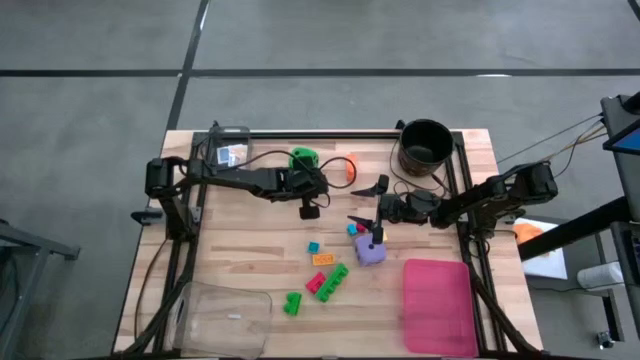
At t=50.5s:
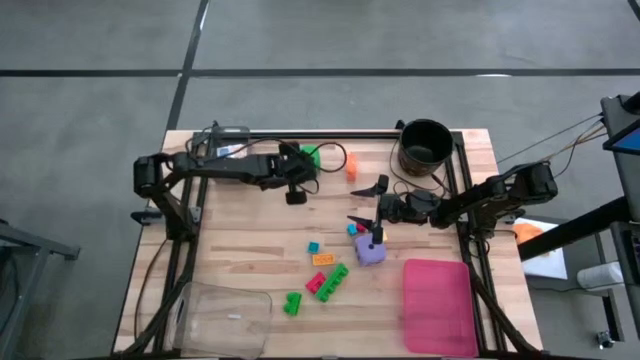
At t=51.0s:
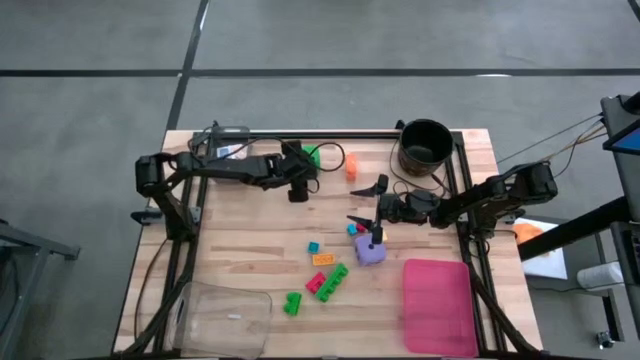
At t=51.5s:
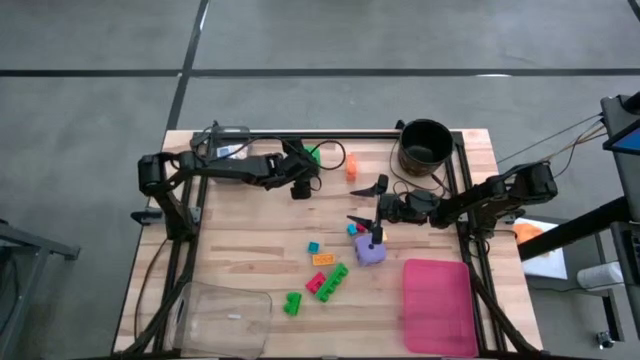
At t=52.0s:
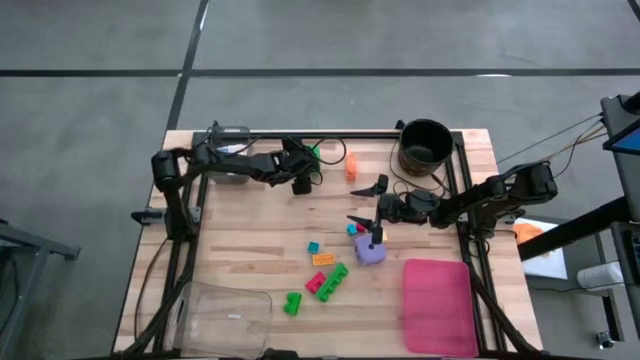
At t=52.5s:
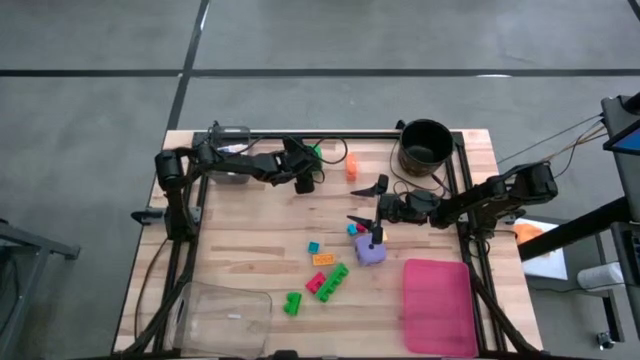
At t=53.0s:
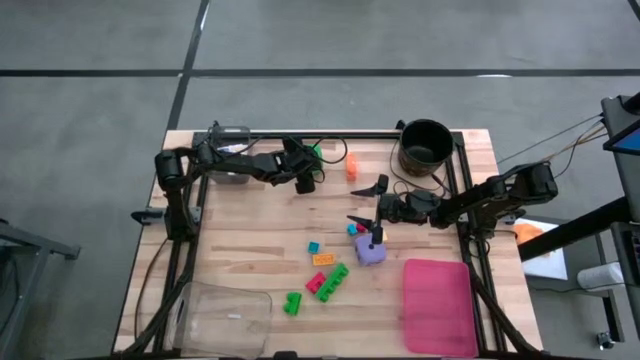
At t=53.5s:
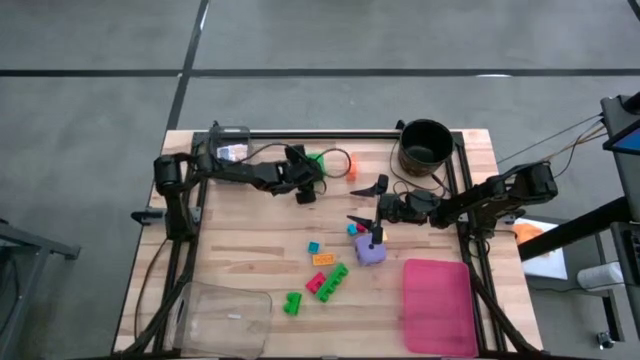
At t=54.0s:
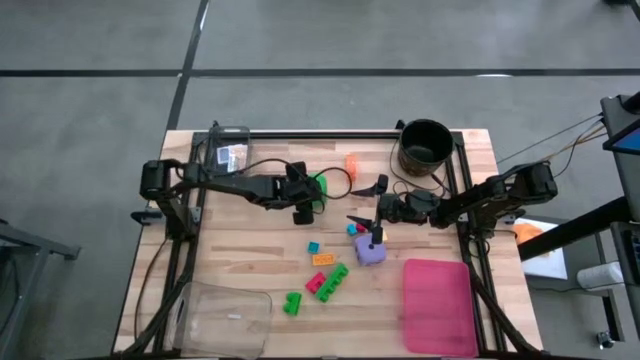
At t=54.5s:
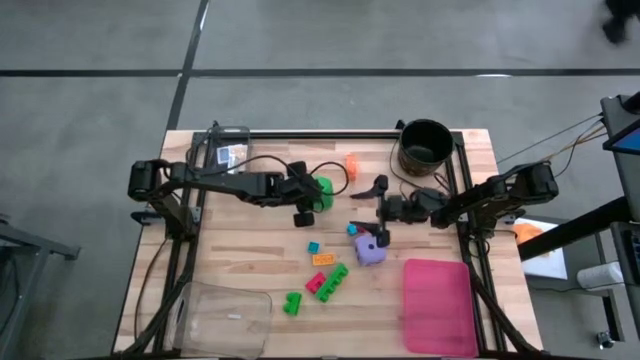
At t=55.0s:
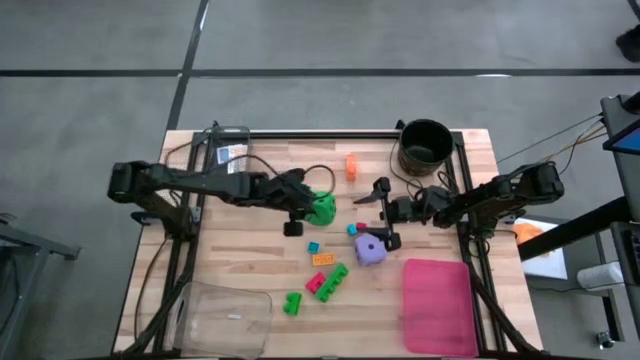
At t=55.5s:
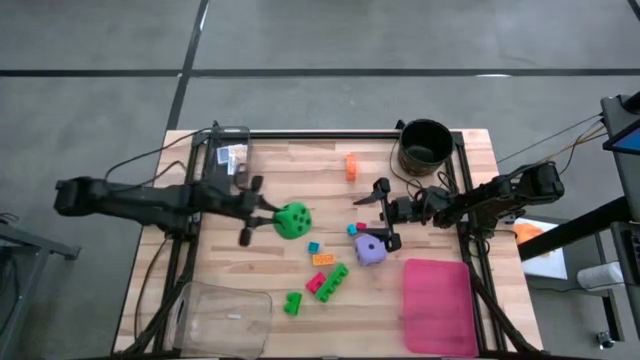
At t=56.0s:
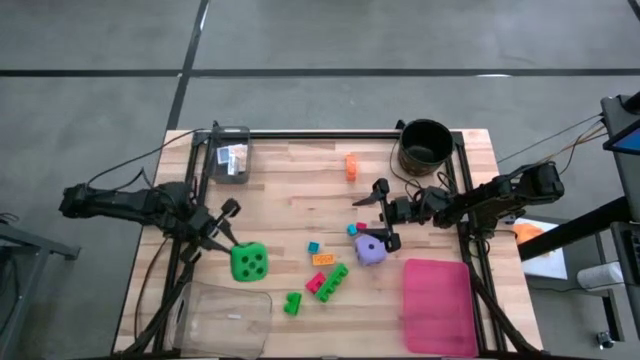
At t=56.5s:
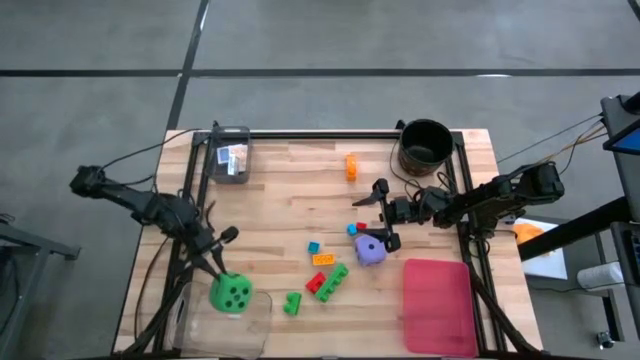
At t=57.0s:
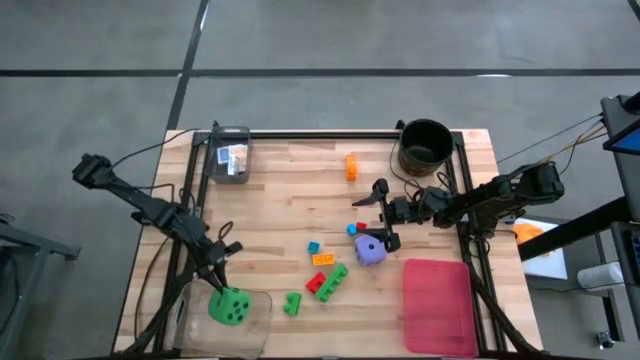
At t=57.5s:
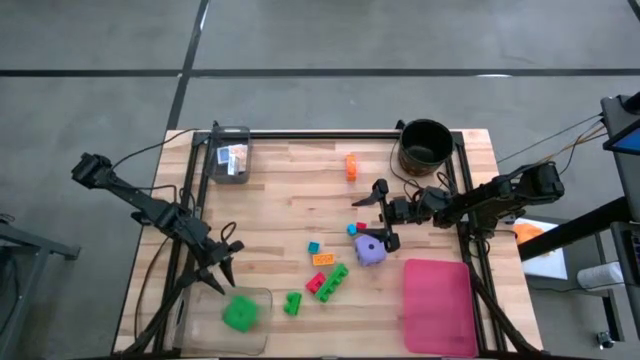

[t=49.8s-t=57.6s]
Task: Pick & Place Toys
Put the green die into the transparent bin

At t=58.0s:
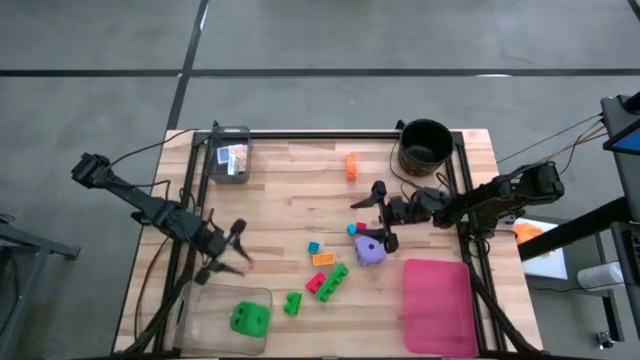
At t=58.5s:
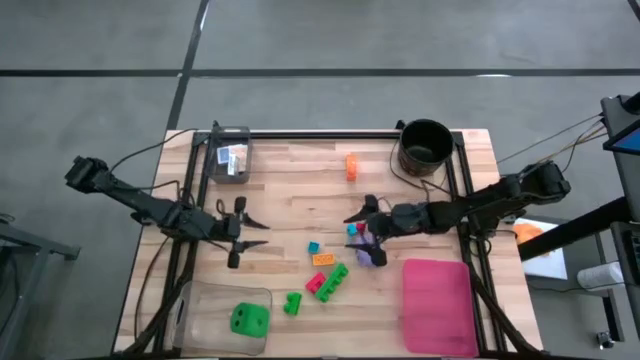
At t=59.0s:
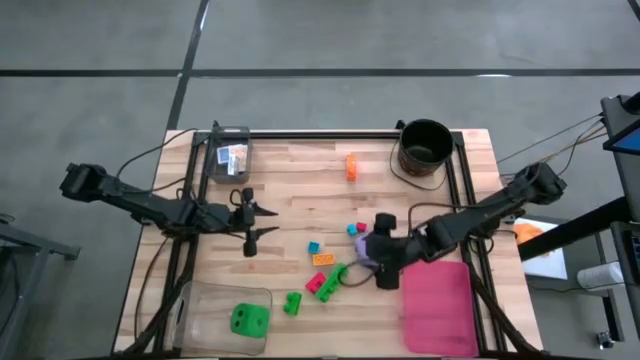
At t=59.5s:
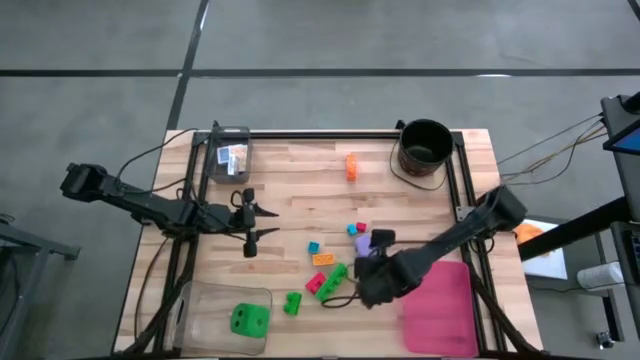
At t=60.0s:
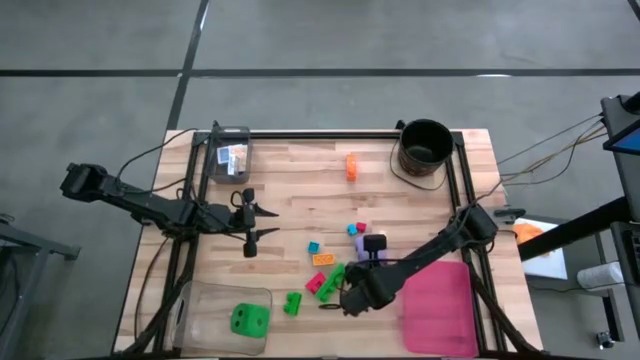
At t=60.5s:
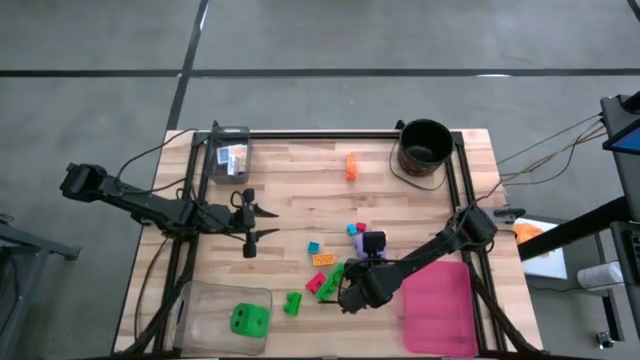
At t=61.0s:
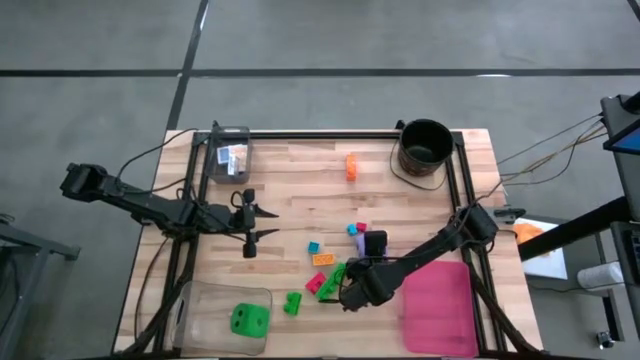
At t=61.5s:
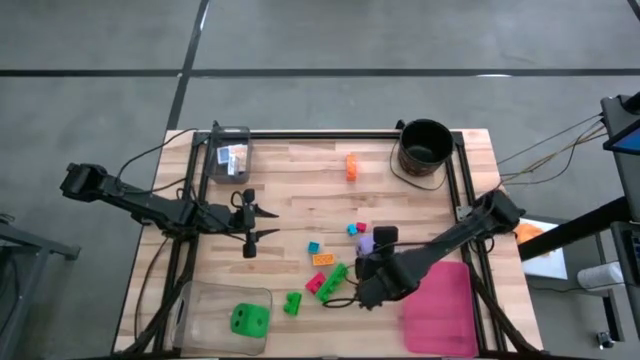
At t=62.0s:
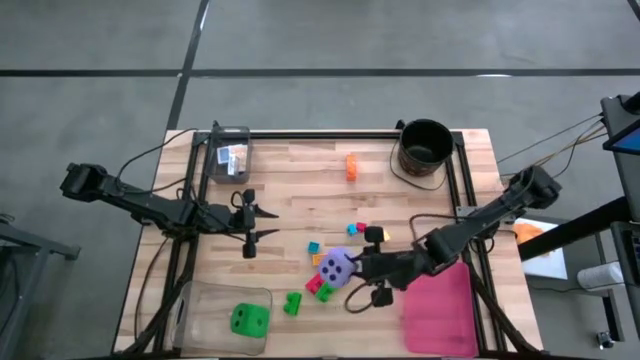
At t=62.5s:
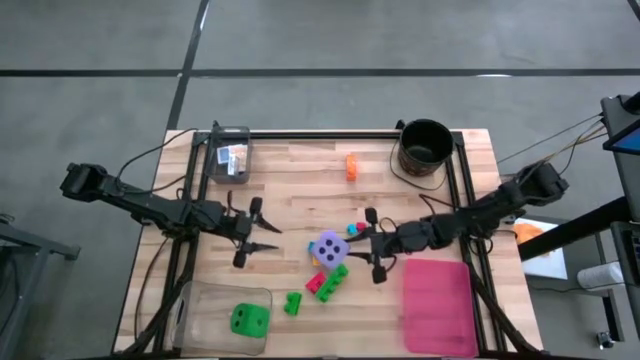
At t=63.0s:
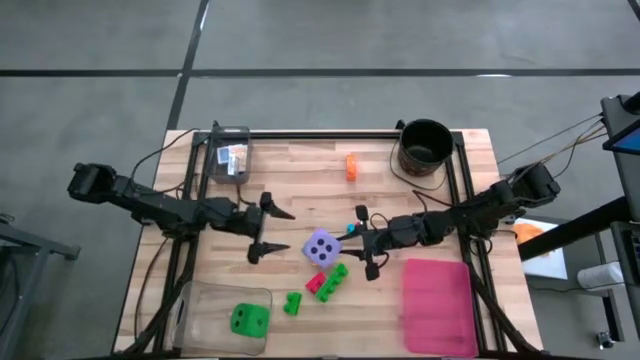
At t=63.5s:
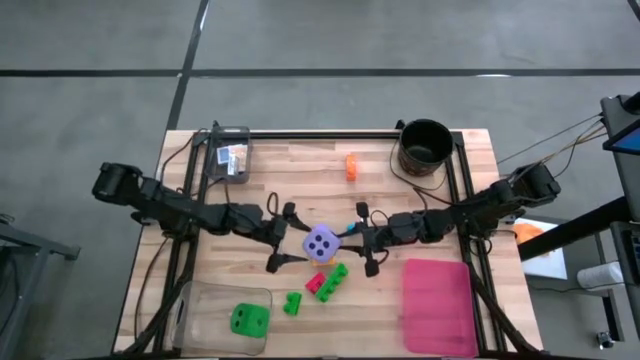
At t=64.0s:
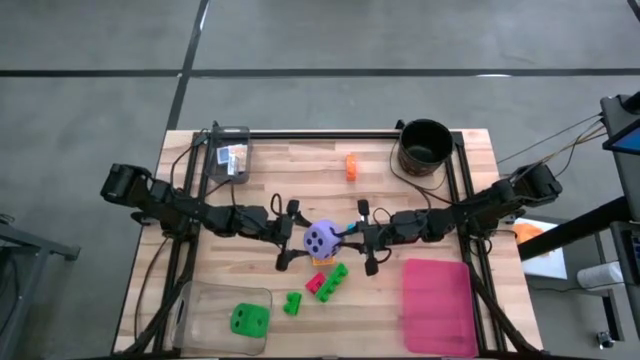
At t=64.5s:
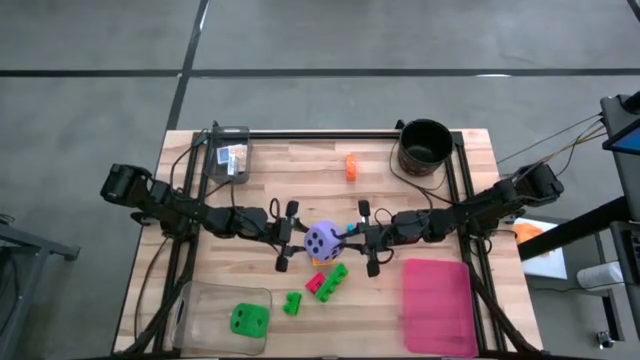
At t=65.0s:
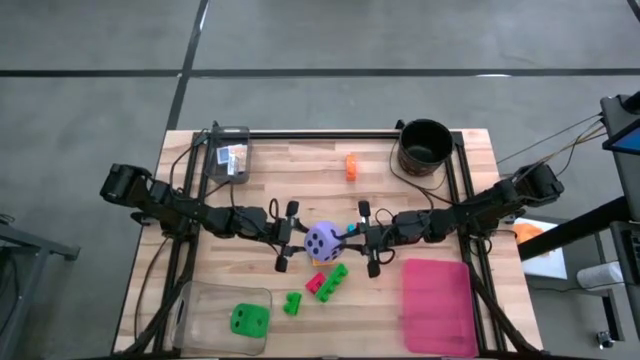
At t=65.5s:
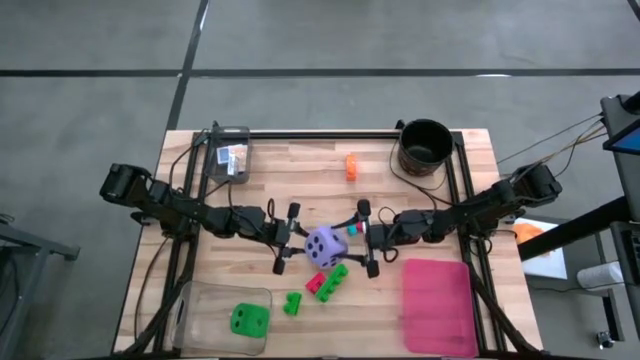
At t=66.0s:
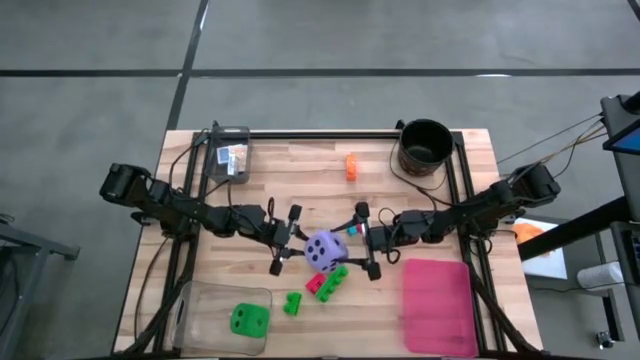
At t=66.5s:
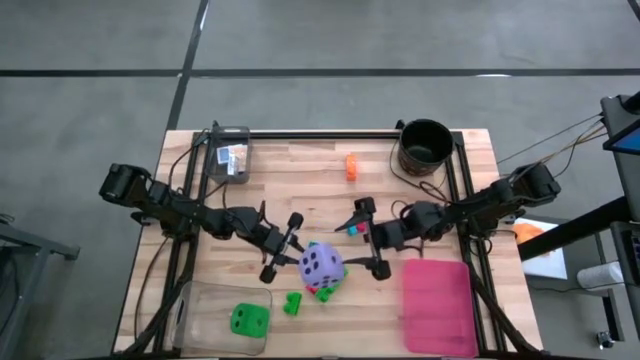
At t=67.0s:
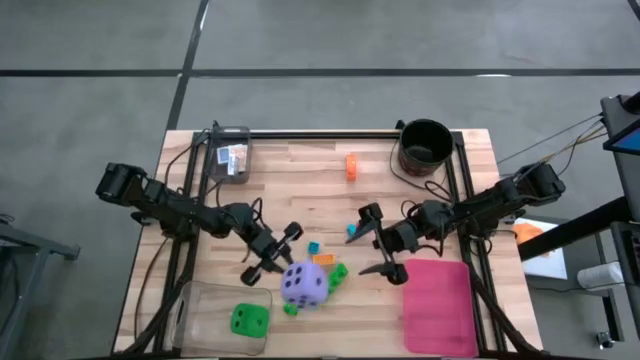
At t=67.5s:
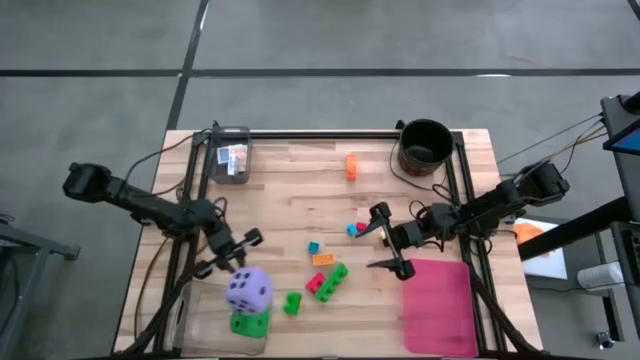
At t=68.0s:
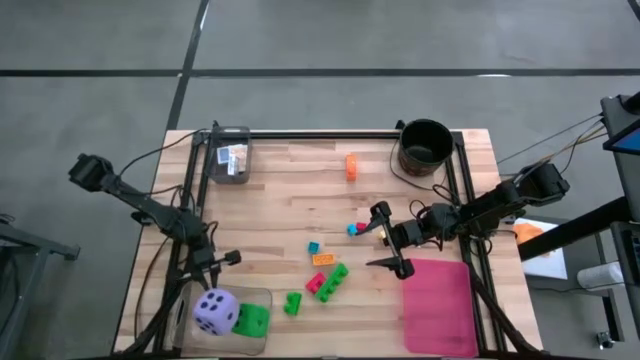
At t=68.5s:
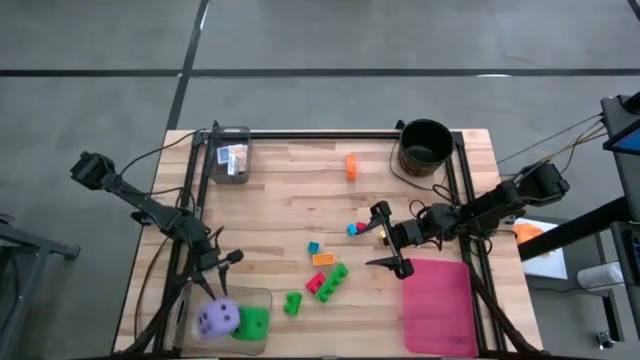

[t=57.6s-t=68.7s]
Put the purple die into the transparent bin

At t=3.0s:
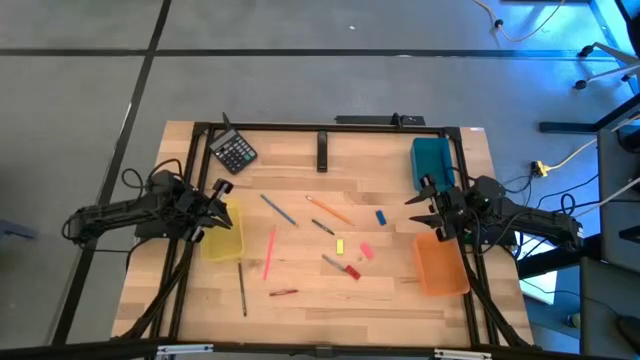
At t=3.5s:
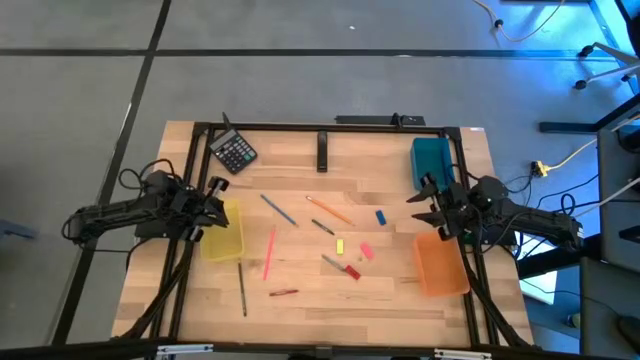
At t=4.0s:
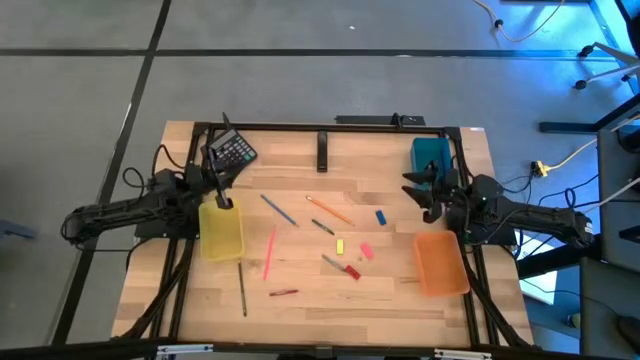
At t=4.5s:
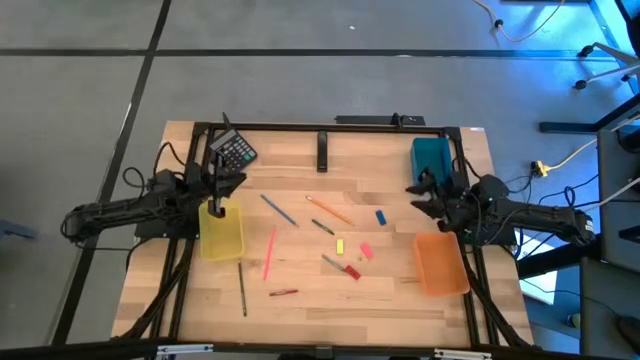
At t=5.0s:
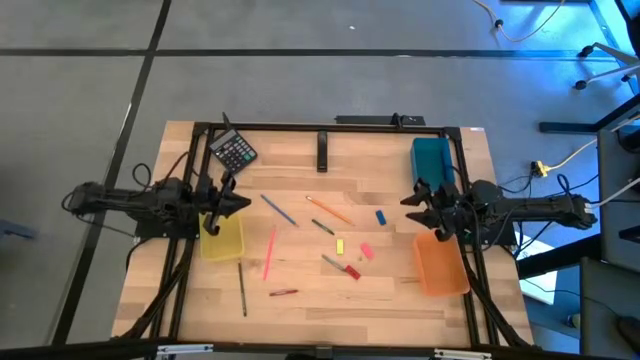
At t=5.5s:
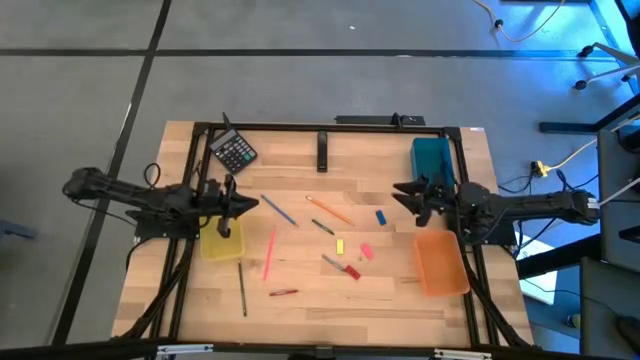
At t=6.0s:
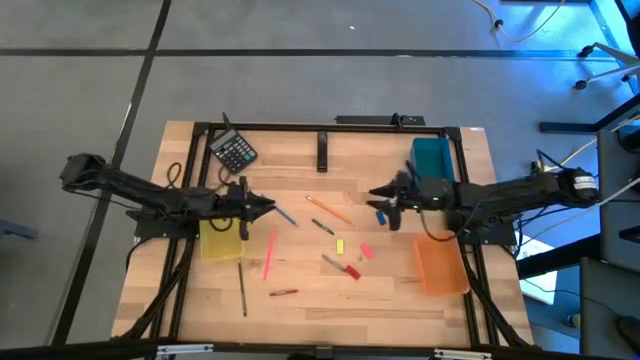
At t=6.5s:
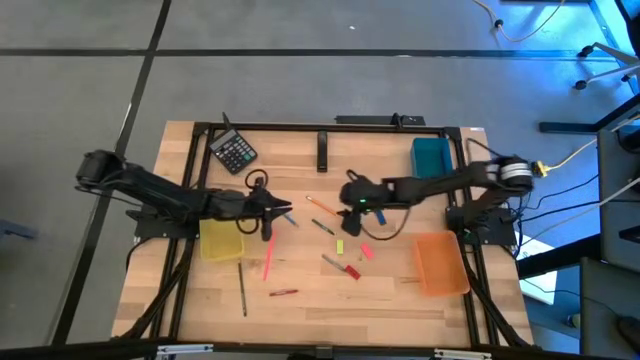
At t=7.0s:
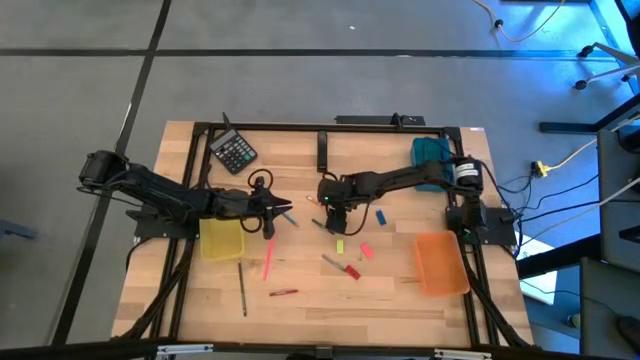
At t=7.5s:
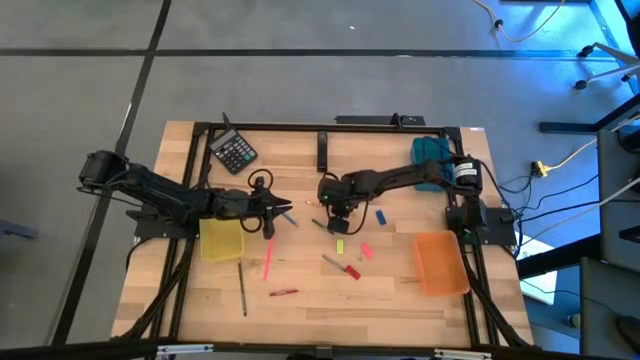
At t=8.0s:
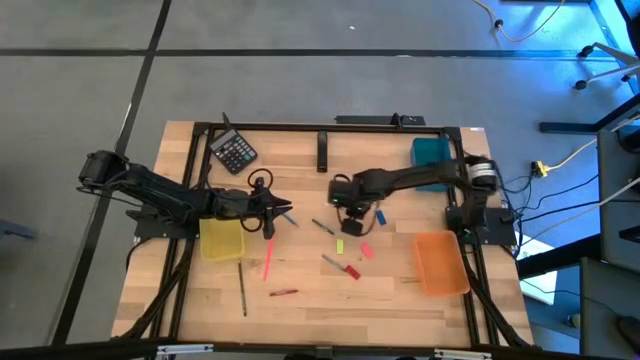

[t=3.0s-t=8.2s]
Task: Sort crayons/erasers/pens/pencils in bins
Put the orange pencil into the blue bin
